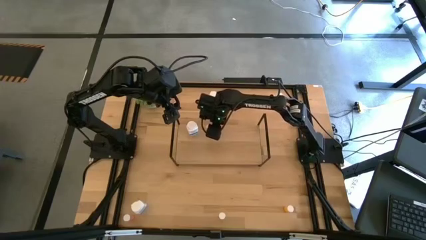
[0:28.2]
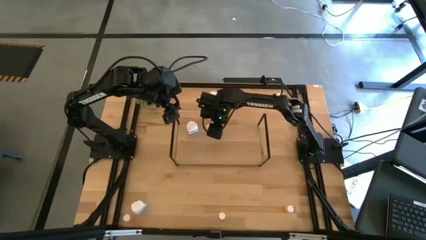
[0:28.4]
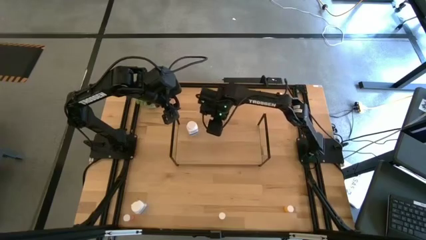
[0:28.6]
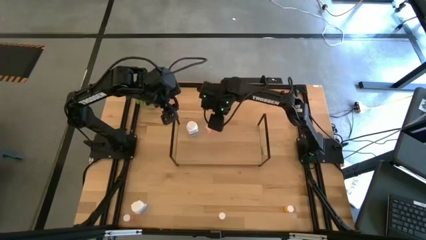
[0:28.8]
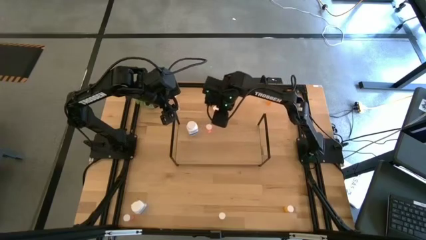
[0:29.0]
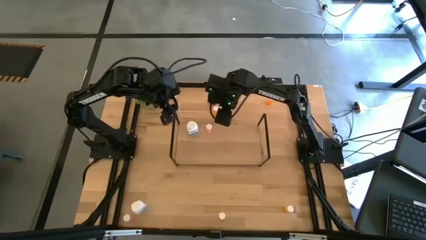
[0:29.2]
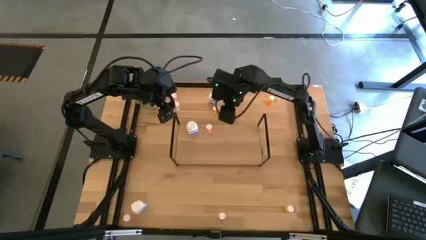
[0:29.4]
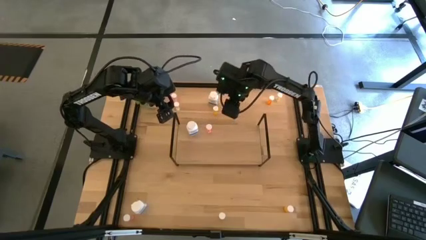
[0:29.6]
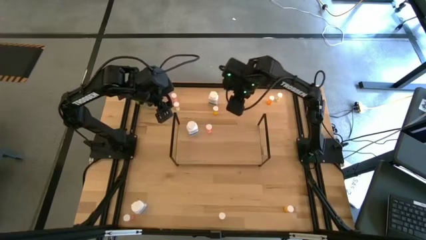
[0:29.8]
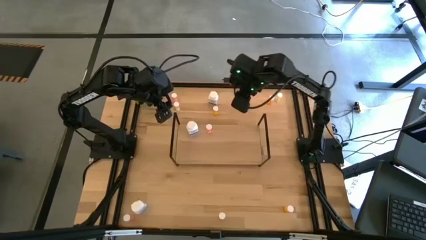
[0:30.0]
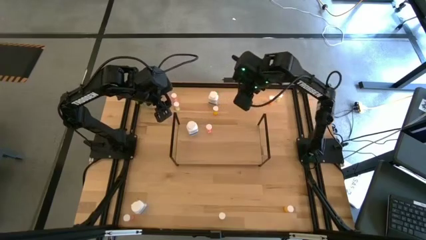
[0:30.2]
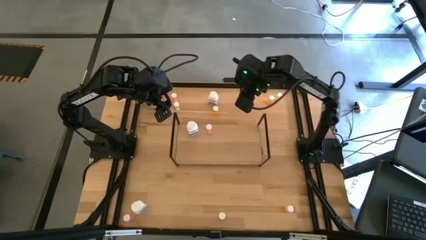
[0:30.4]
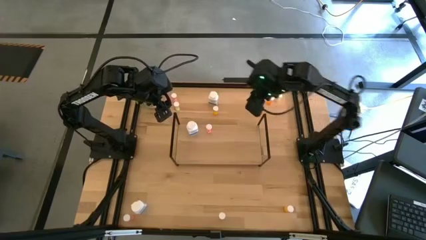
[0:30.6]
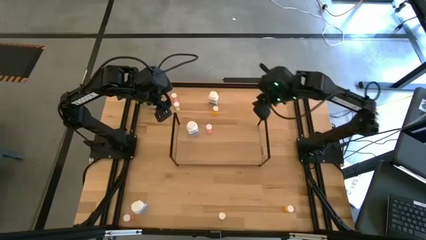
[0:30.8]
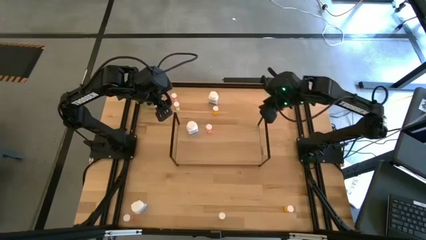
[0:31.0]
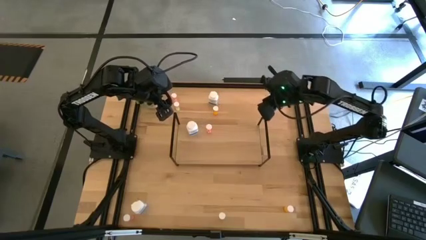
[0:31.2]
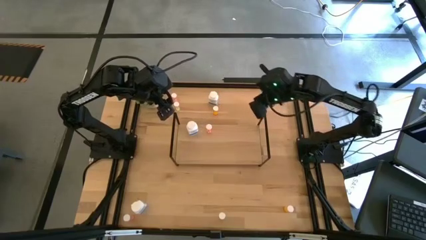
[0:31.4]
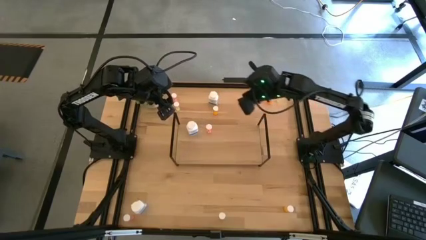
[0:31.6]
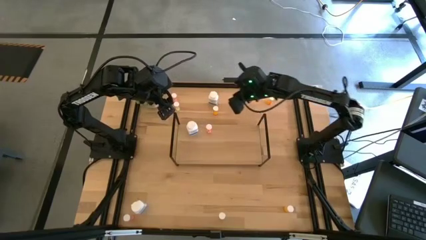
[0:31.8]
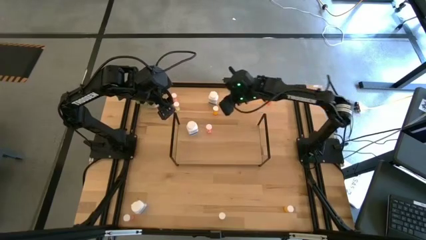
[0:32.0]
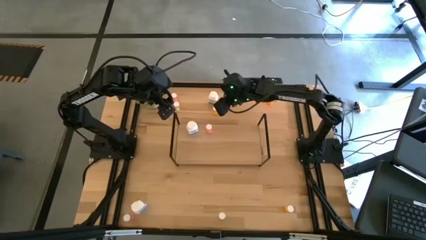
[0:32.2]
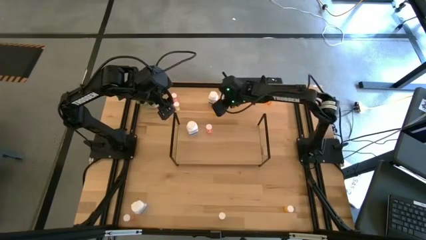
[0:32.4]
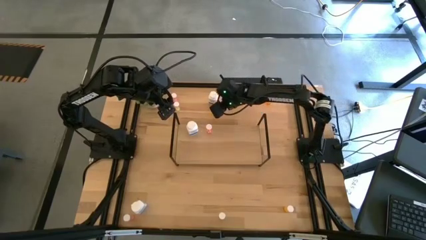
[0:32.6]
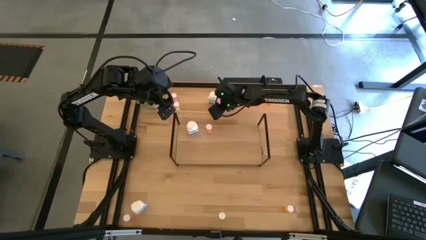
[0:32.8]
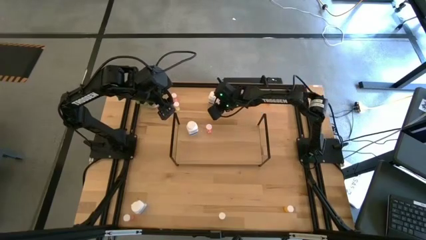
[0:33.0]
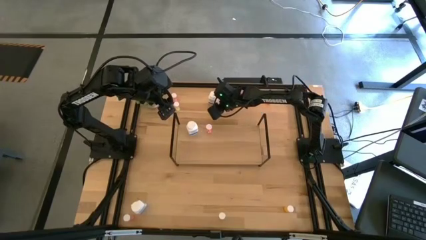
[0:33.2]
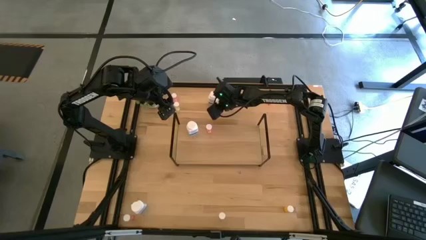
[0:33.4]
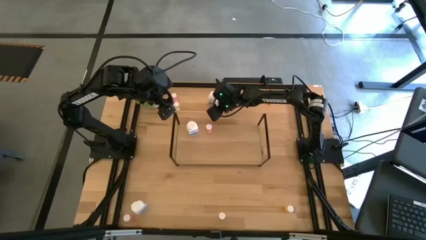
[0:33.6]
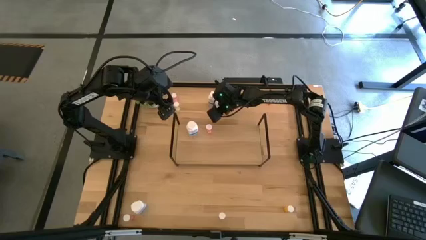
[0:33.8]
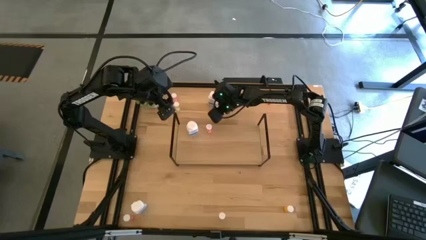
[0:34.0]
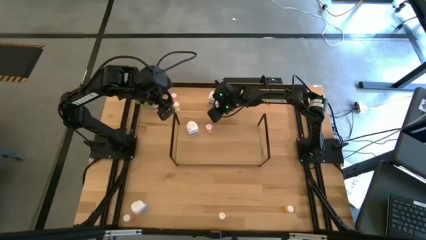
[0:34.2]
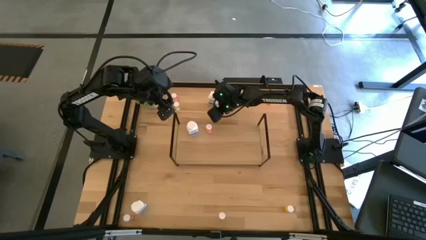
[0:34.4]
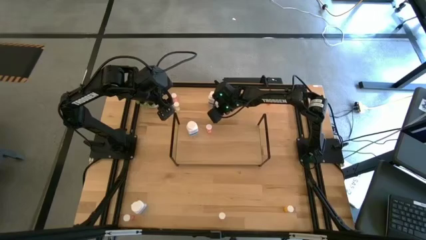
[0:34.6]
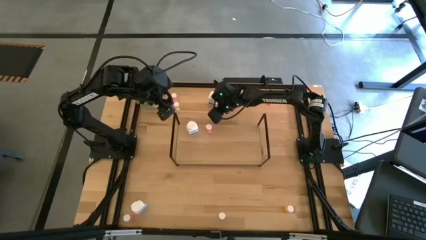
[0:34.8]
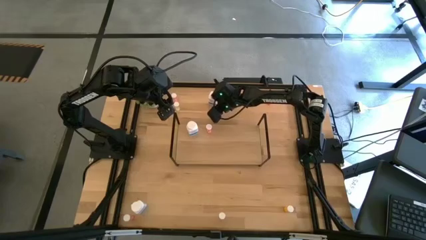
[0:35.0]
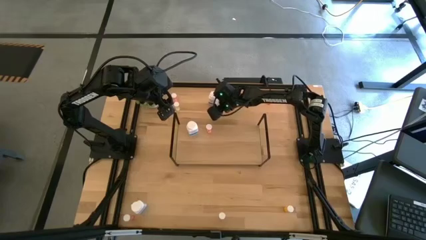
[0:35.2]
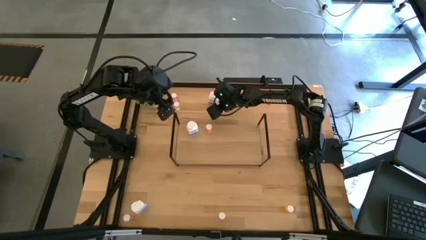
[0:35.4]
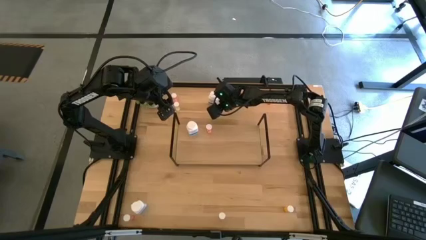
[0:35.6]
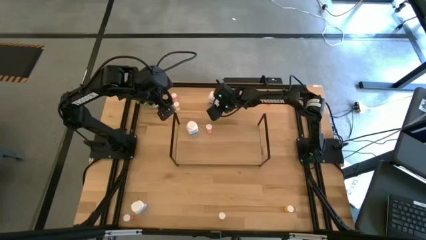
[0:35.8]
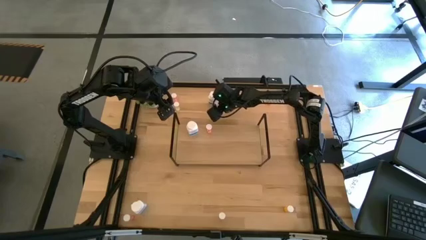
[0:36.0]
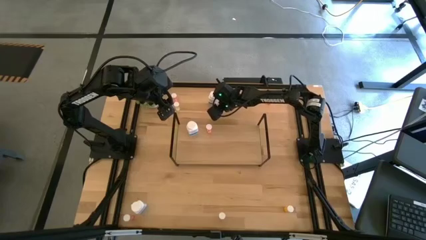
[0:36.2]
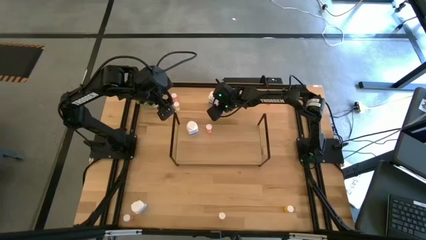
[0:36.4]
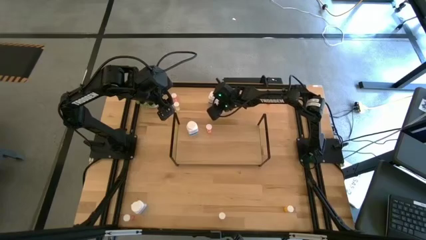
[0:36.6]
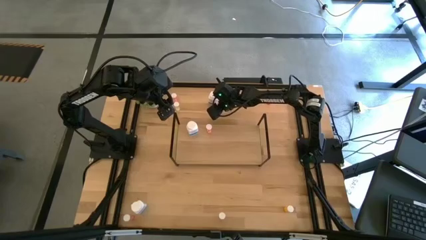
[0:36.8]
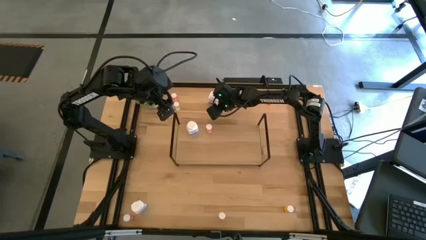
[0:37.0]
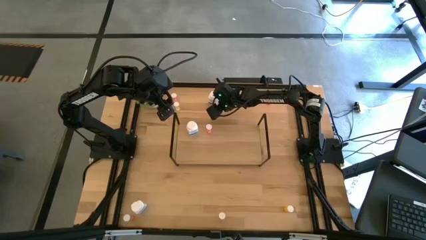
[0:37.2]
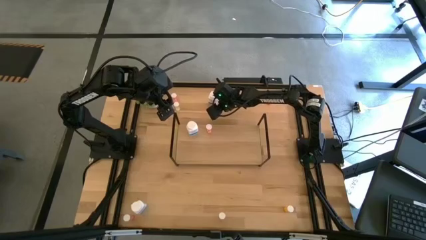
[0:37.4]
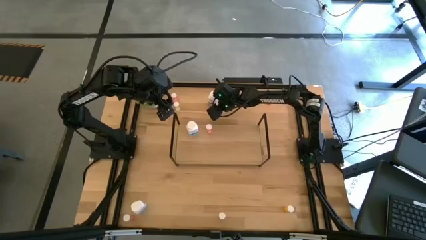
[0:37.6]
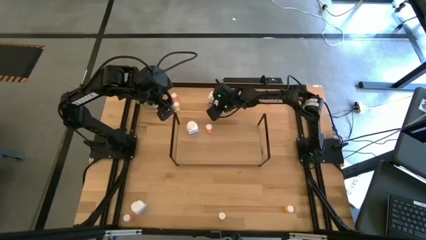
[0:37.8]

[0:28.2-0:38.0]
Task: Pick and place medicine bottles onto shelf by color
Put the left orange pill bottle on the shelf

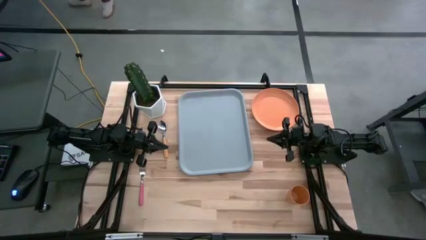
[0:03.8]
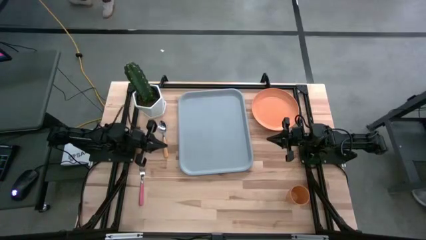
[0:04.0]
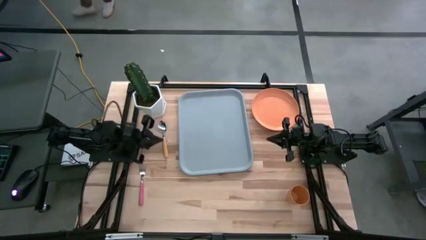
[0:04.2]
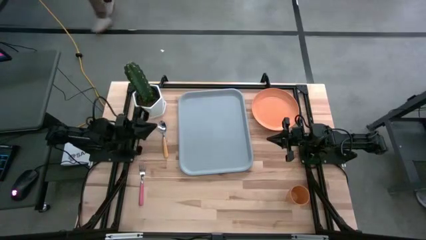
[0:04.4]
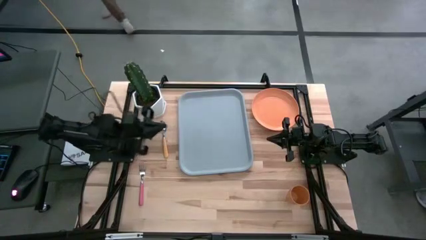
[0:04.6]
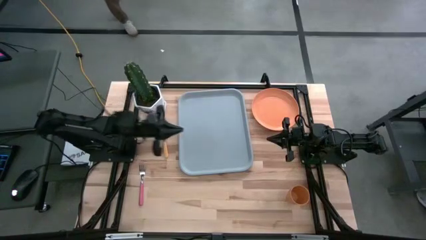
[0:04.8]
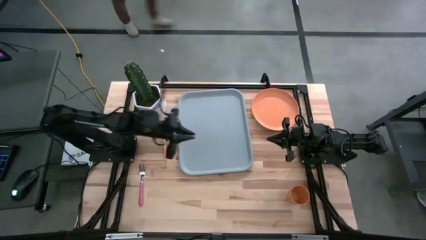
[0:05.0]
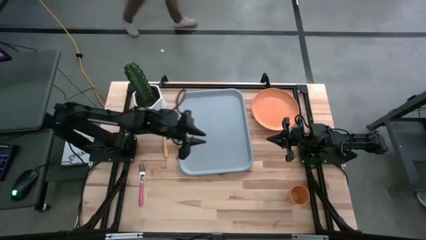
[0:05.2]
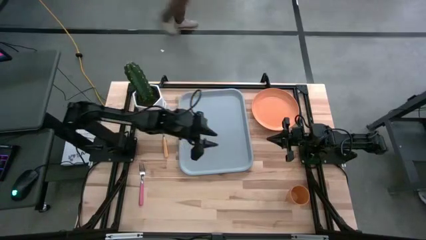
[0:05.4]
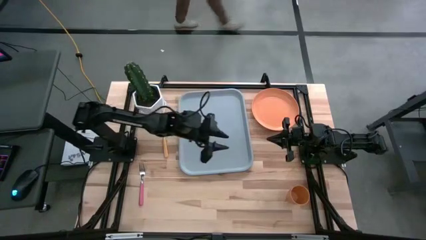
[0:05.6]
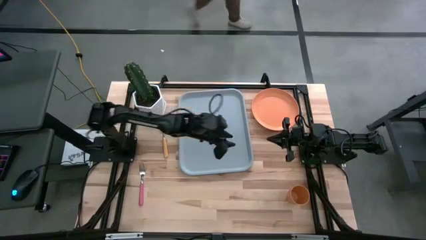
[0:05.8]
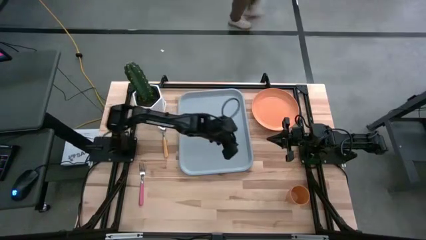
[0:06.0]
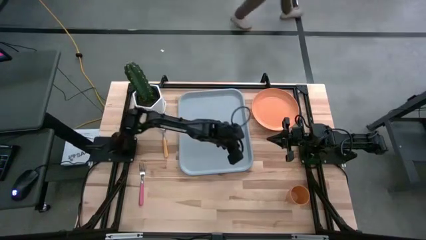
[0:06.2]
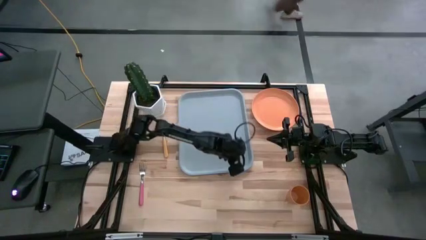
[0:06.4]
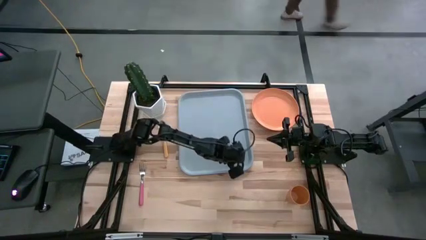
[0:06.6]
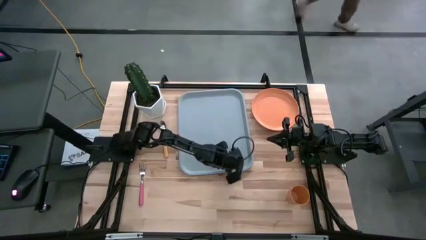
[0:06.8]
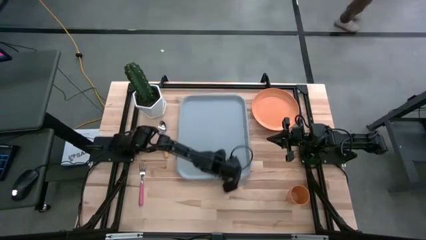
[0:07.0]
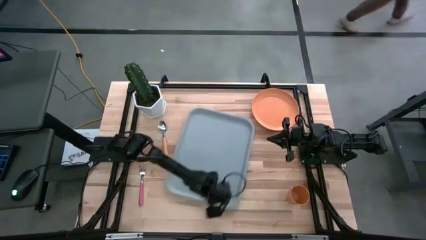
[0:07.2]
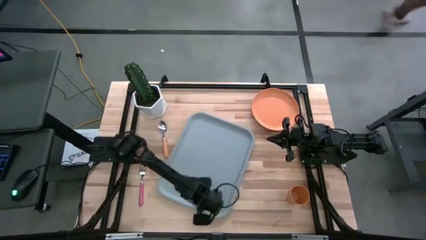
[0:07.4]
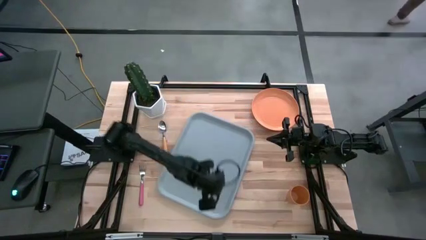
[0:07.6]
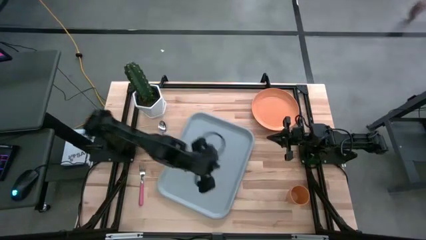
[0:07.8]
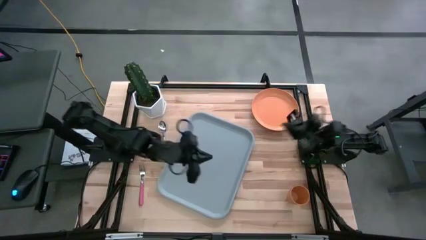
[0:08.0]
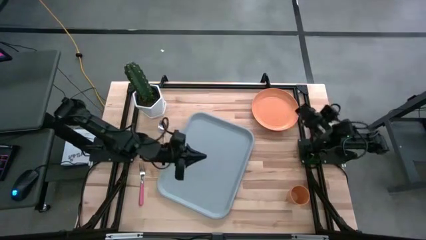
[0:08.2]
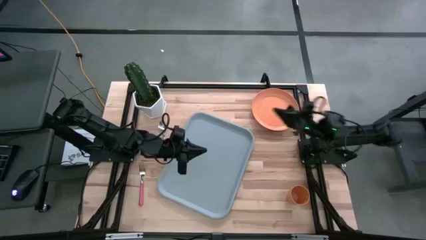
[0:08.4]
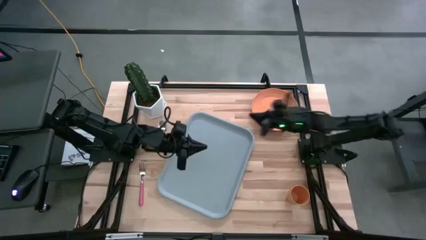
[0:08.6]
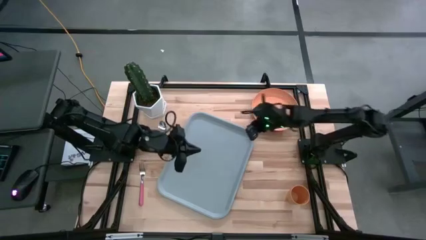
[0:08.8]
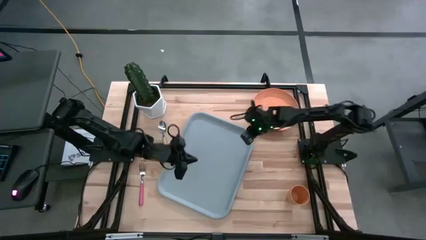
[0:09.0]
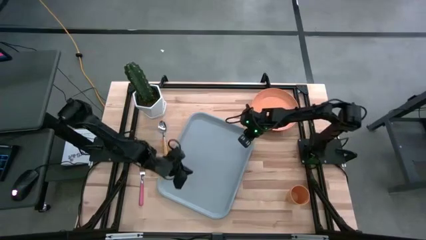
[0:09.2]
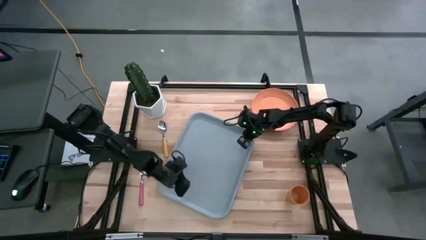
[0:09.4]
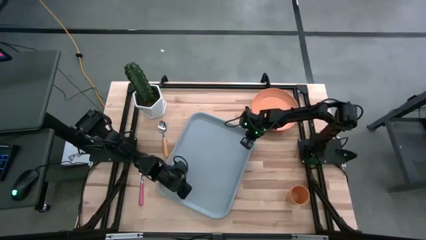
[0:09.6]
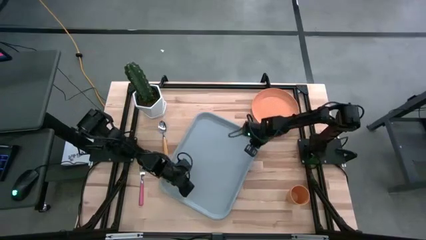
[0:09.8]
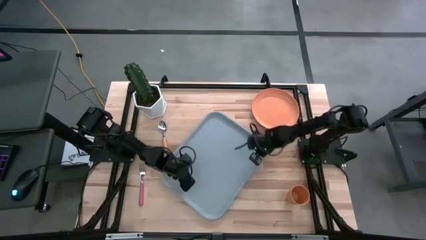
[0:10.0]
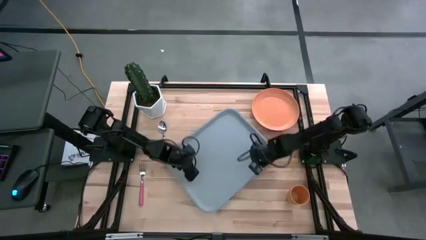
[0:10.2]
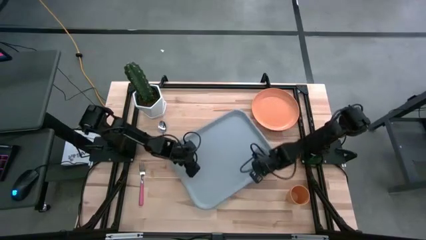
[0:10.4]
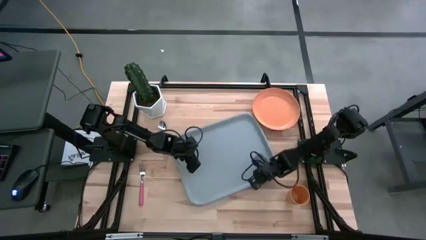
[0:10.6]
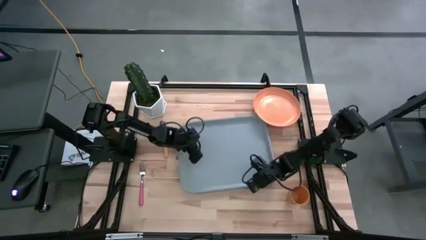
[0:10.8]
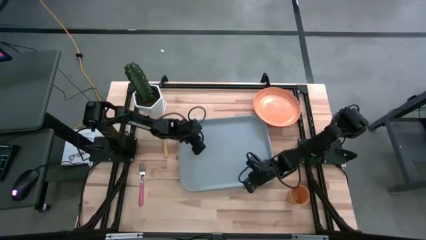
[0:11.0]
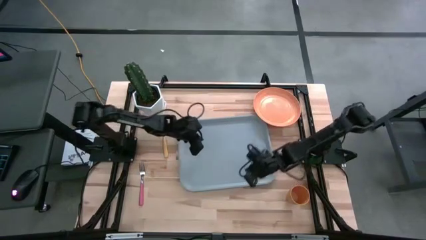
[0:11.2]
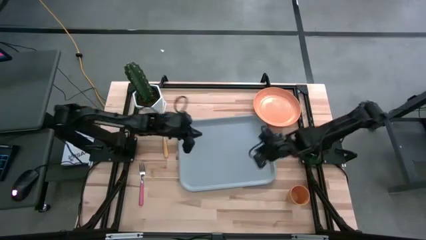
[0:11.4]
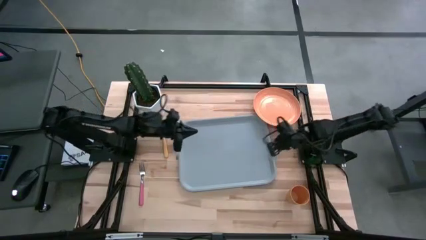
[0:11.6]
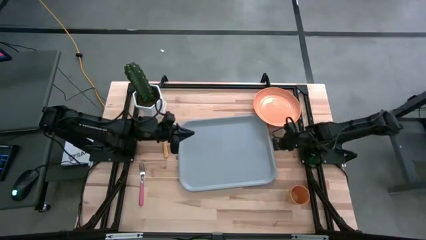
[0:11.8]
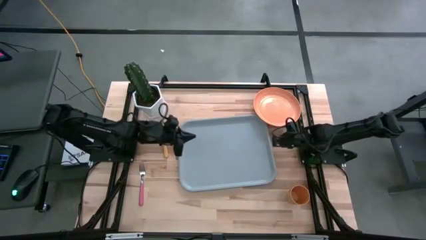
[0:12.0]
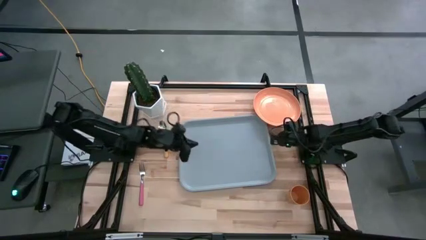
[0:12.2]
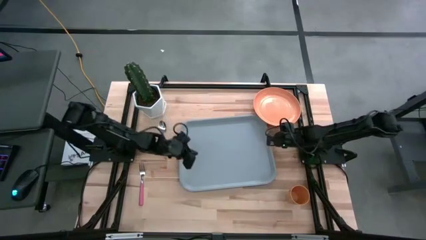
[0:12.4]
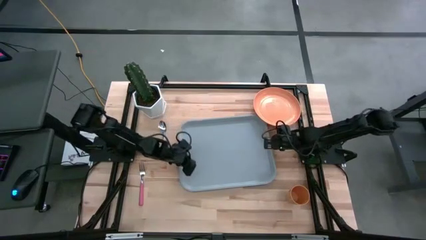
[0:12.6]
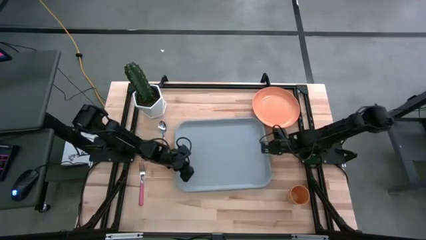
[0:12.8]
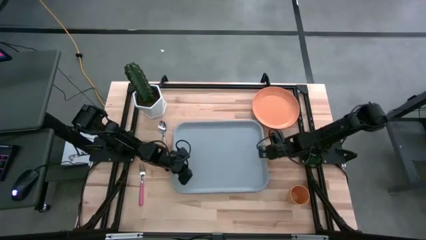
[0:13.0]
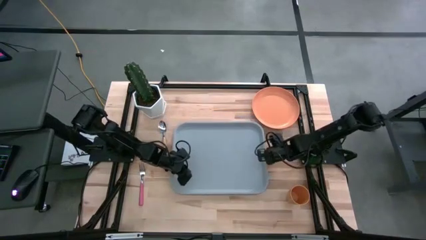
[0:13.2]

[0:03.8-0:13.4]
Task: Pick and place plate/cup/fork/spoon on tray
Move the gray tray to the center of the table
